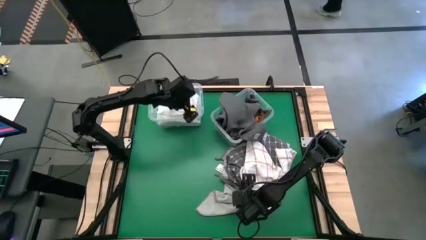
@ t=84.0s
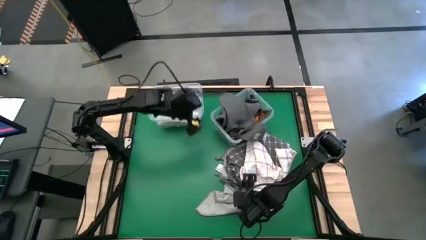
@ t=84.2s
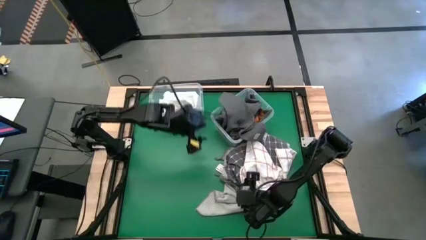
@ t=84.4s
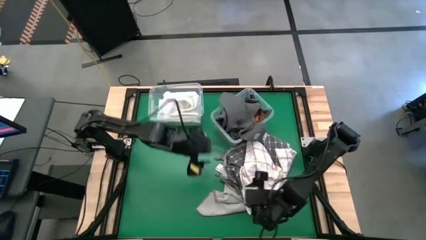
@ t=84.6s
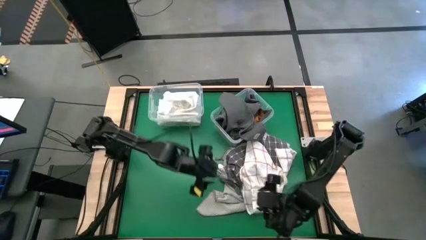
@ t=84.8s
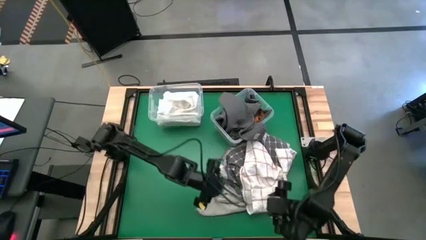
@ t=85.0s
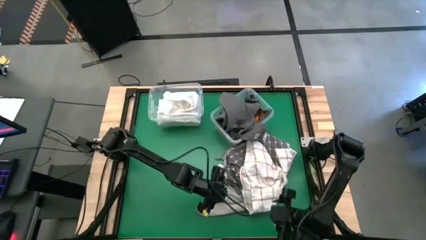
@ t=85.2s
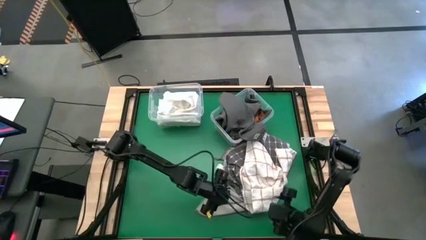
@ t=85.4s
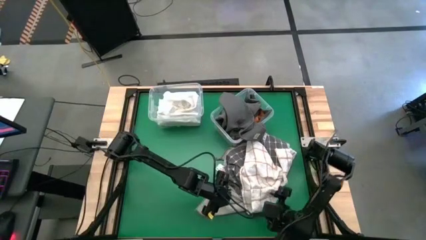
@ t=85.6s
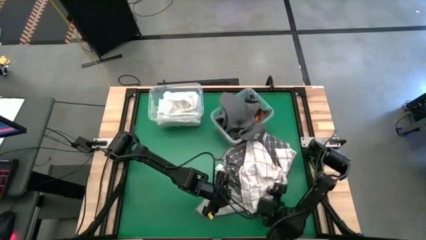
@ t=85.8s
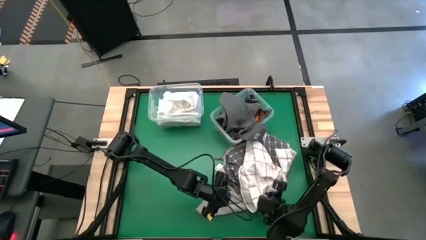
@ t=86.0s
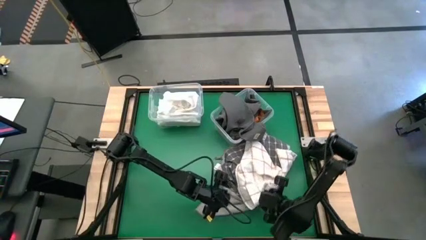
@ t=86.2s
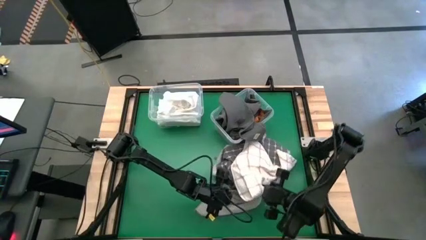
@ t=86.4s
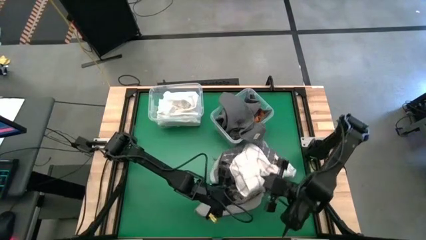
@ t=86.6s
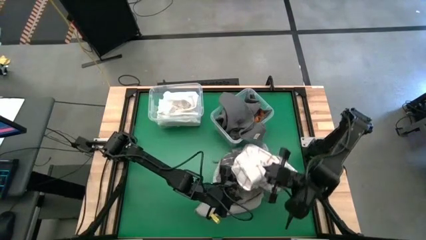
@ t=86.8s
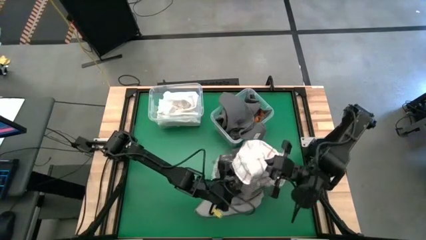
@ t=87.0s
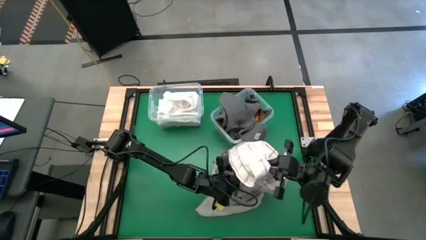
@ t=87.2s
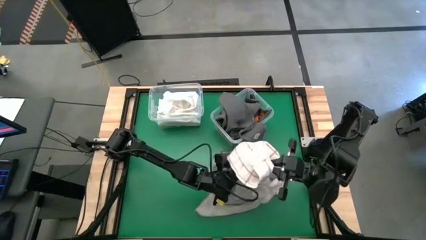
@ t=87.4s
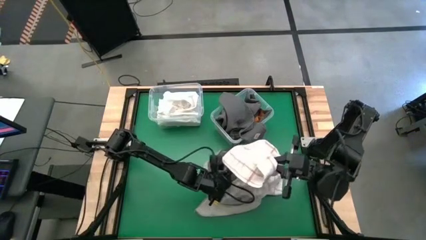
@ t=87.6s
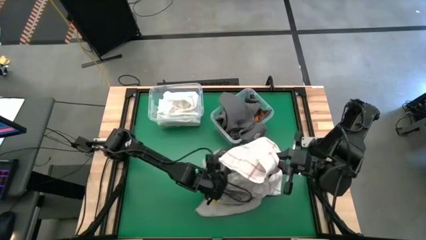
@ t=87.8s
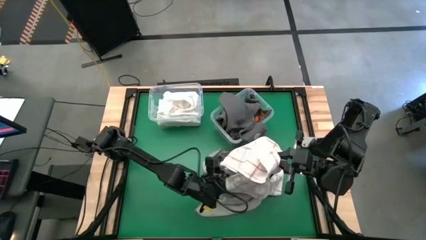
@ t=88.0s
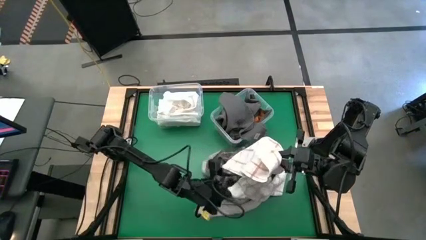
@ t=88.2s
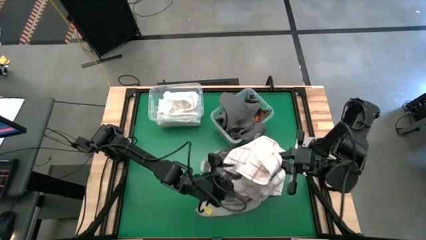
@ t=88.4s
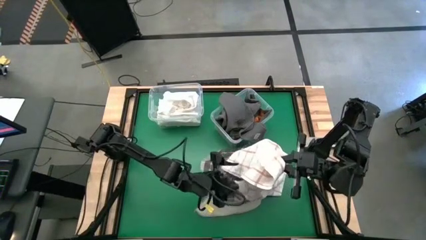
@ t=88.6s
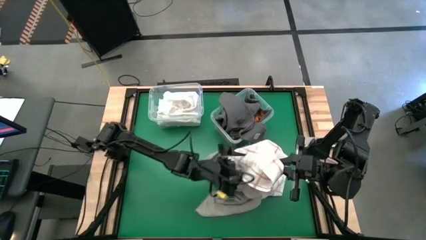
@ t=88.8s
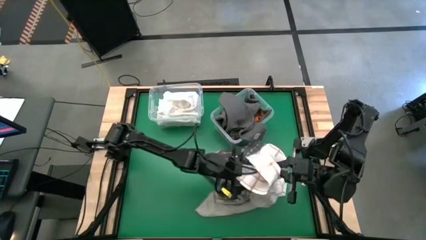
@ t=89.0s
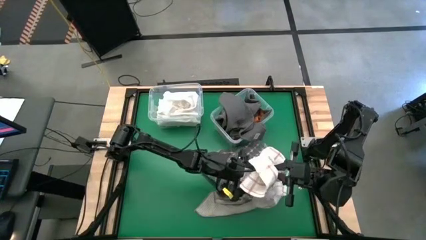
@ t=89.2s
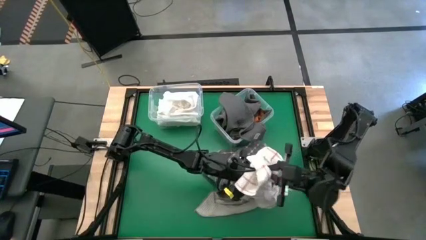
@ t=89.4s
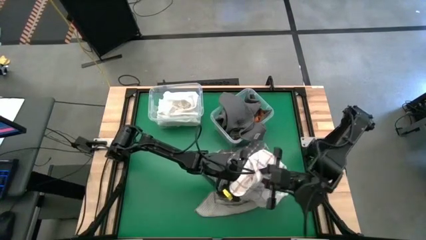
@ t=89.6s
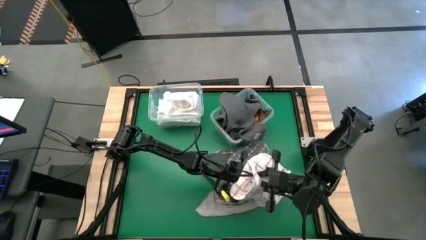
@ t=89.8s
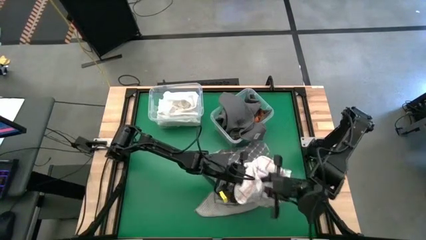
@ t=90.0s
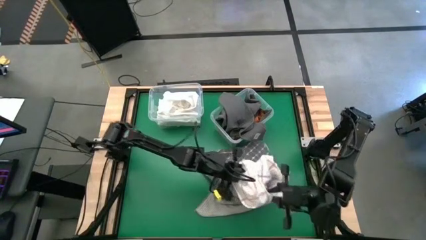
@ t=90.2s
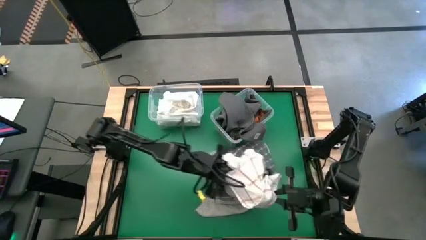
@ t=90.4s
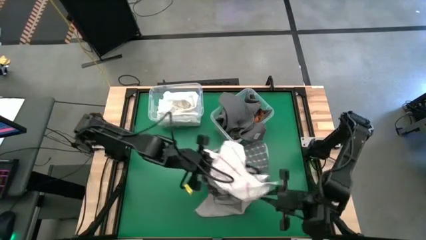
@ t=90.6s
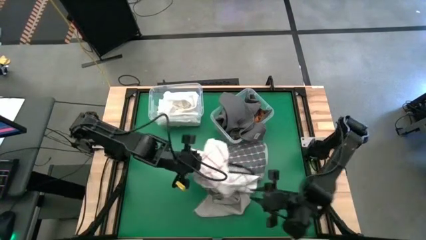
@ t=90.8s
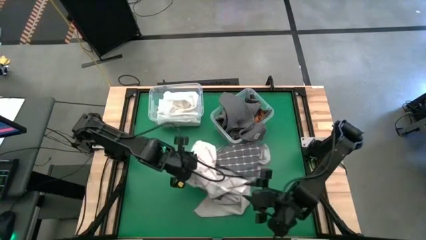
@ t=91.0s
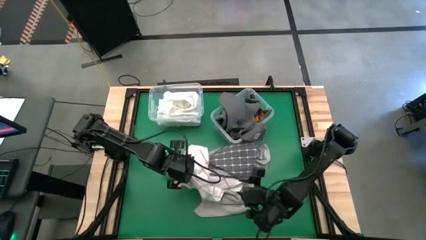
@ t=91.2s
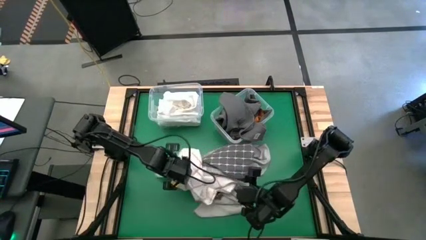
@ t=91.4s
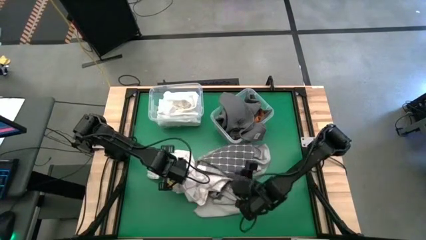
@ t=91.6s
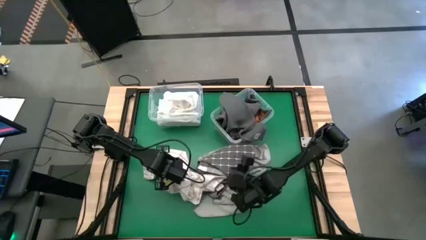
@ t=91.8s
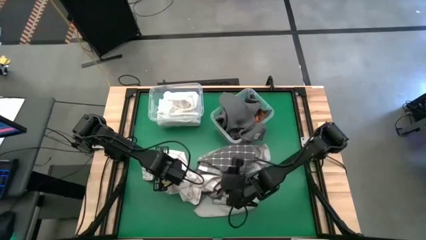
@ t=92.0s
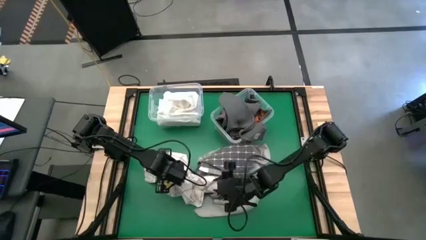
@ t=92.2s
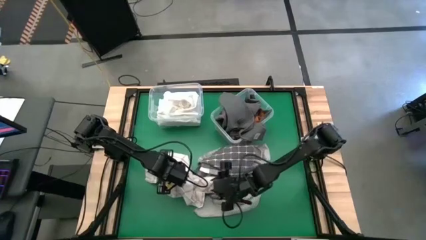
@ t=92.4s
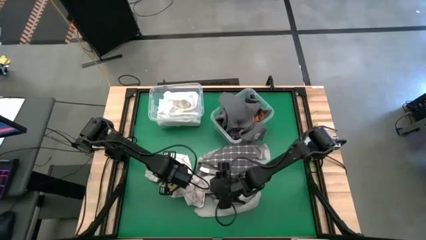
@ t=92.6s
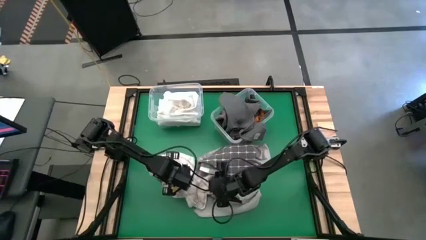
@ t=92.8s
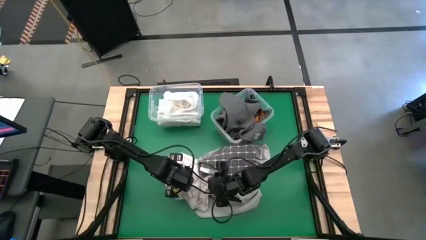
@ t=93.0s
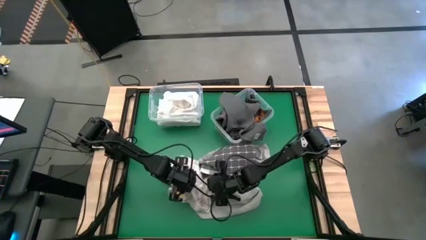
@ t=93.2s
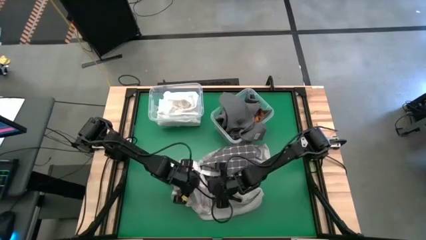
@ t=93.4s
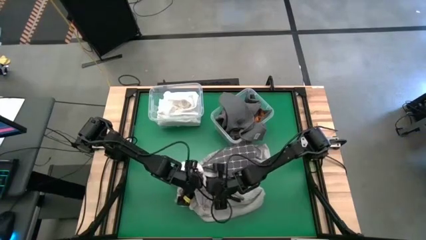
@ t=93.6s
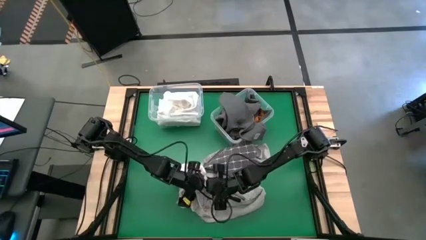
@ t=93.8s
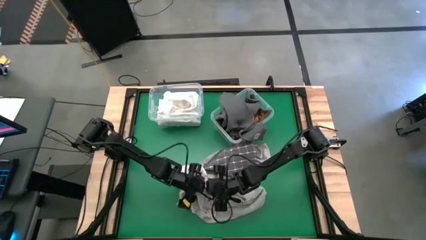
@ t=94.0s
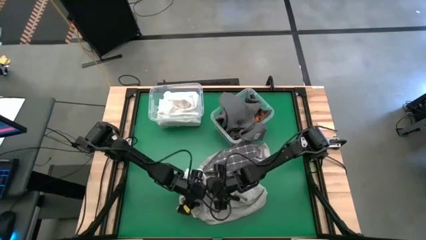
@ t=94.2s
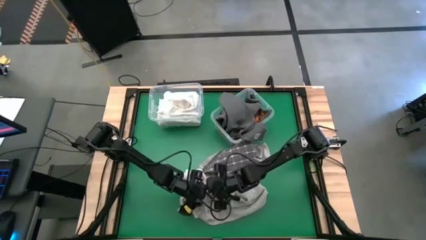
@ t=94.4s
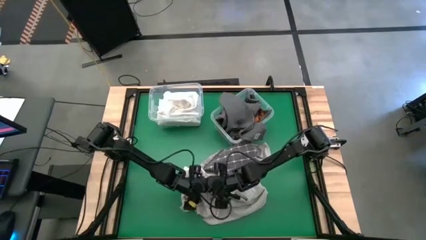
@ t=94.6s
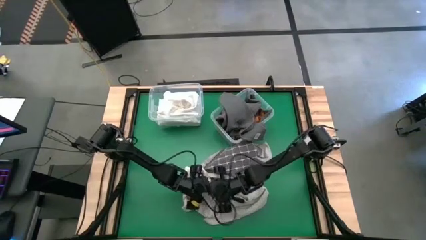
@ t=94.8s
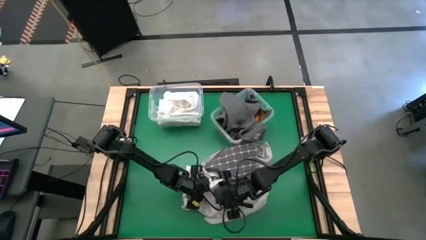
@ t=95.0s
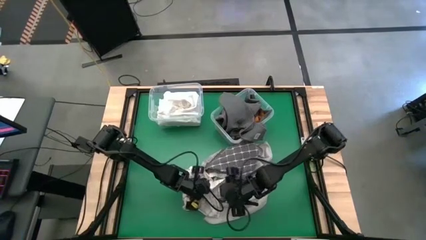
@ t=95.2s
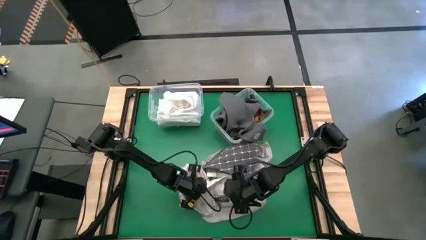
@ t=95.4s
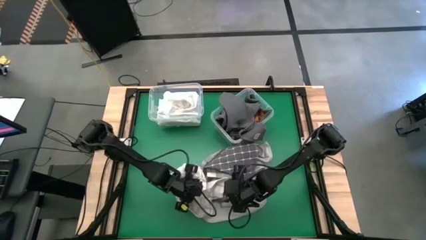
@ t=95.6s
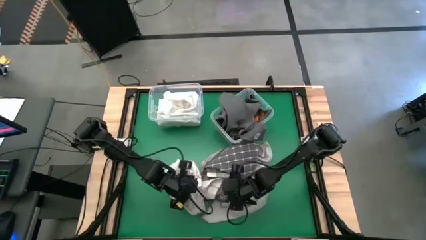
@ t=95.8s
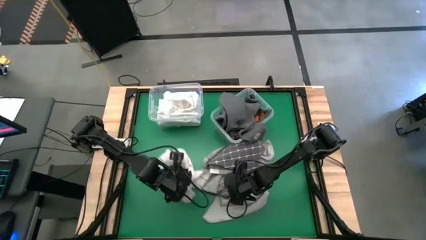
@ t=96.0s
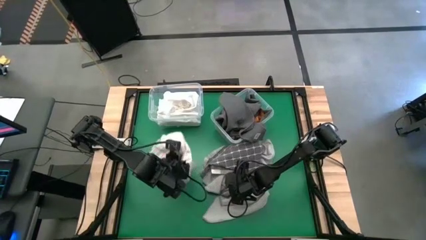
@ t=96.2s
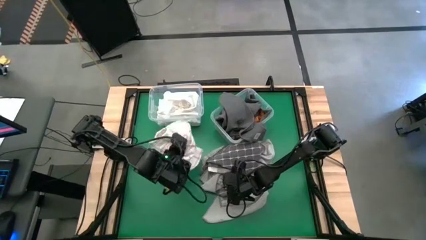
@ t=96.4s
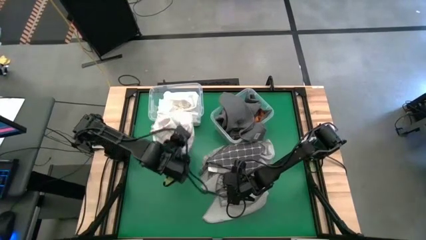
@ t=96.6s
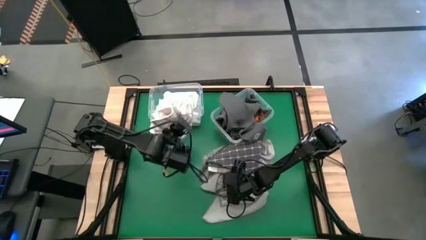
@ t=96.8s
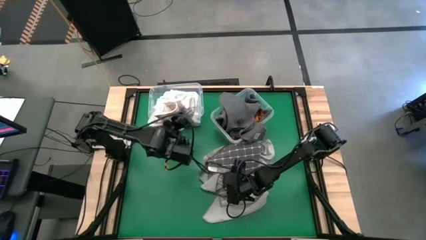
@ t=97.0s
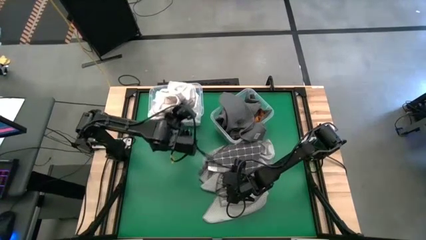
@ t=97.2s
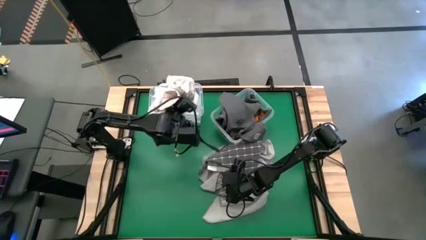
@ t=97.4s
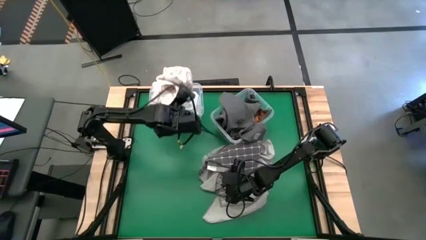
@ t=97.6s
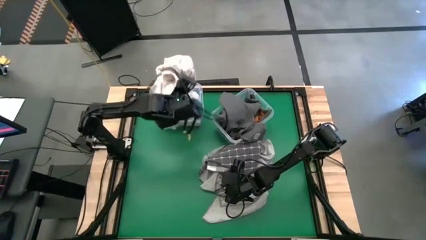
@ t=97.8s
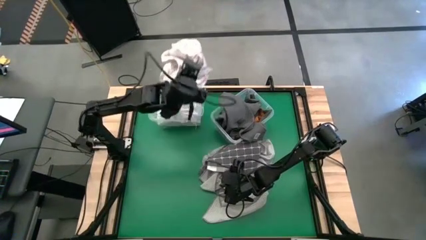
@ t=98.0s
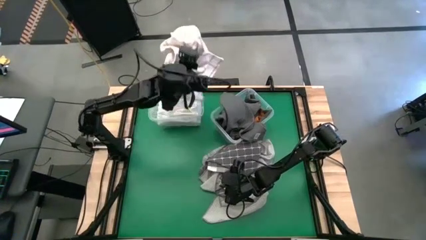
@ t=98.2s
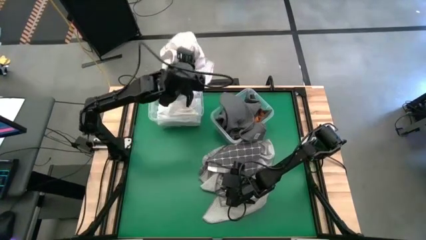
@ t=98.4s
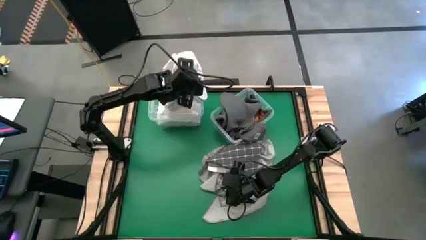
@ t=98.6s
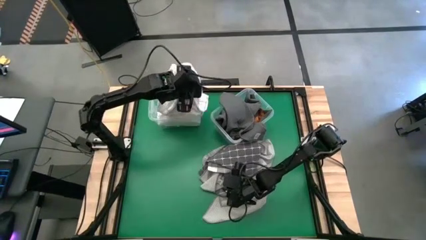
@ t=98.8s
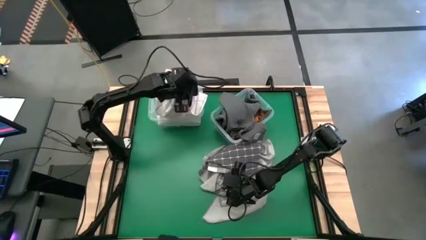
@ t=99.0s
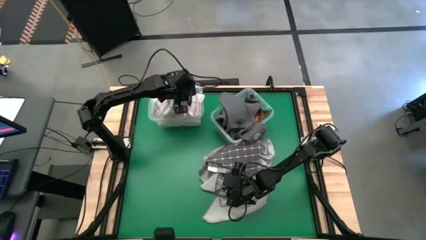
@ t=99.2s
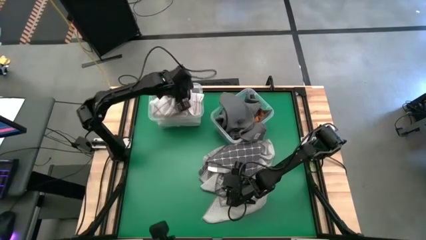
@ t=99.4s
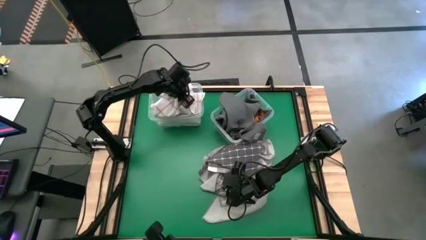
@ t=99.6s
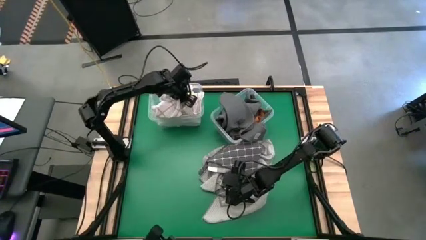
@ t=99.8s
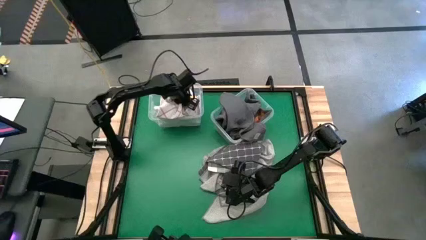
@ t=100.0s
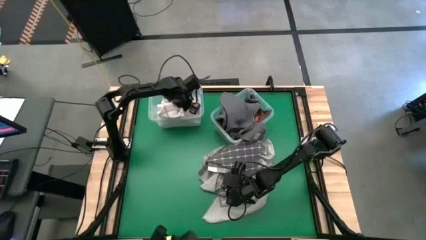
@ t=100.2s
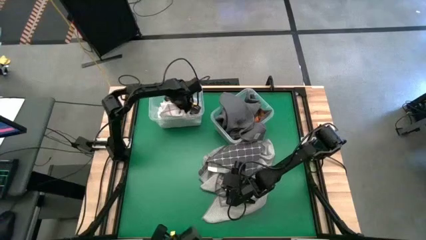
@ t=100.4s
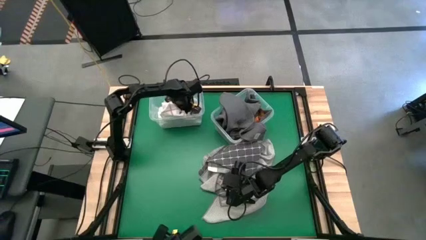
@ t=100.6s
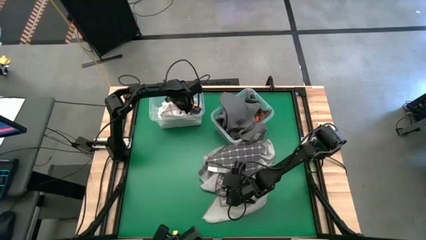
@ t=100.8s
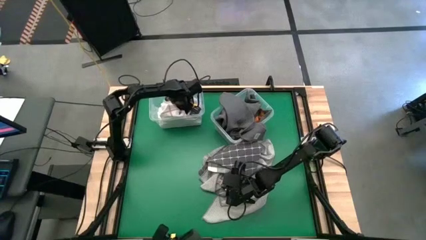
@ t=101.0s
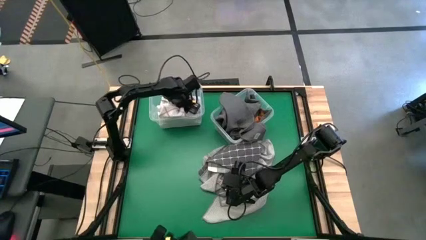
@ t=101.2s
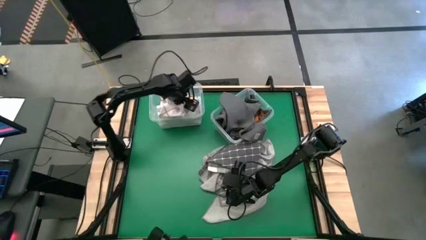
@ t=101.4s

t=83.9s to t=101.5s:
Task: Sort towels by color in basket
Put the white patterned towel into the left transparent bin
